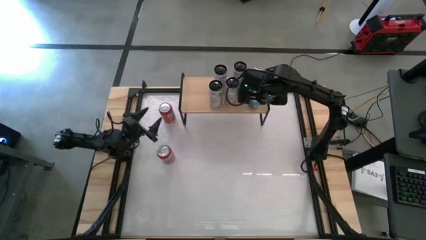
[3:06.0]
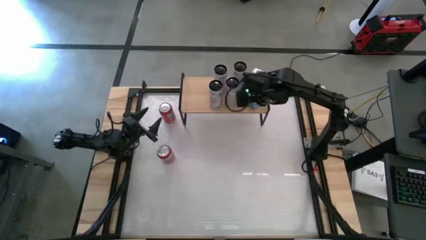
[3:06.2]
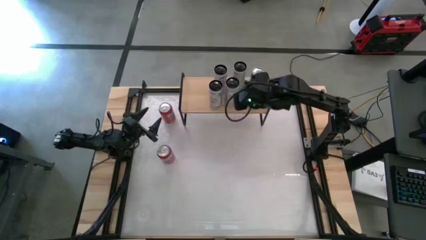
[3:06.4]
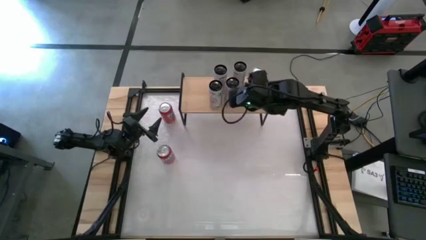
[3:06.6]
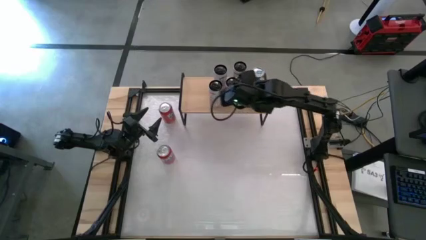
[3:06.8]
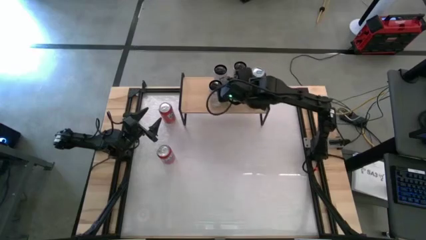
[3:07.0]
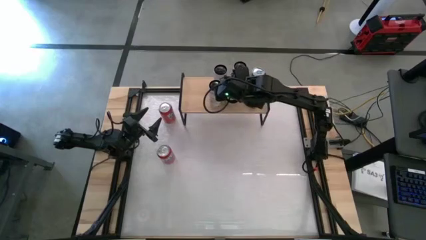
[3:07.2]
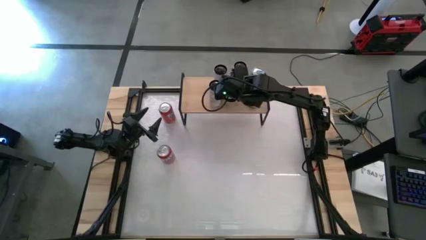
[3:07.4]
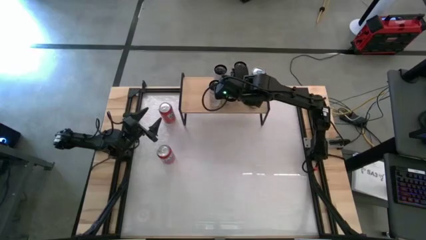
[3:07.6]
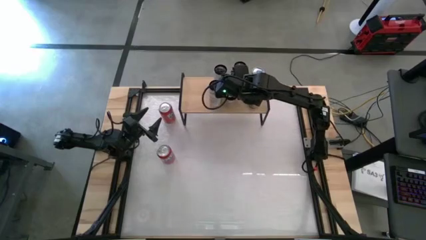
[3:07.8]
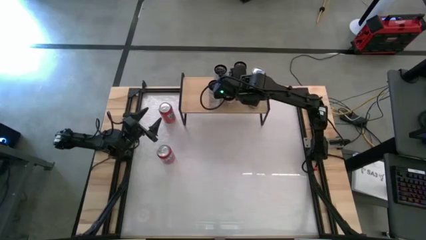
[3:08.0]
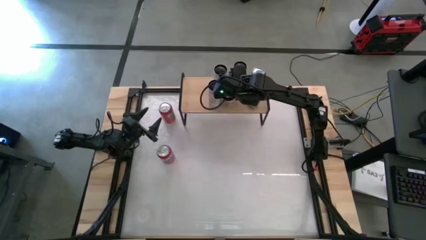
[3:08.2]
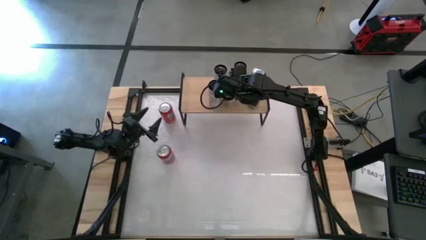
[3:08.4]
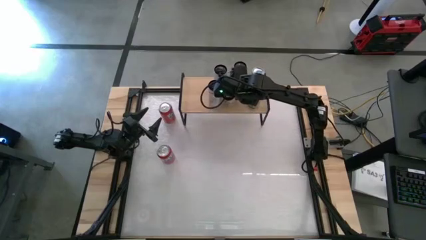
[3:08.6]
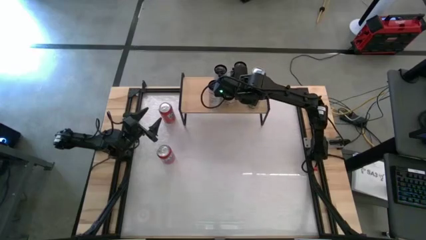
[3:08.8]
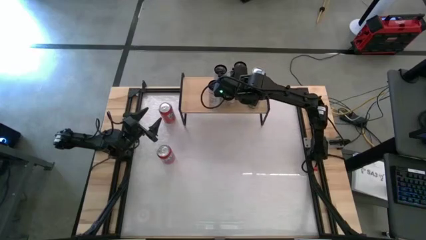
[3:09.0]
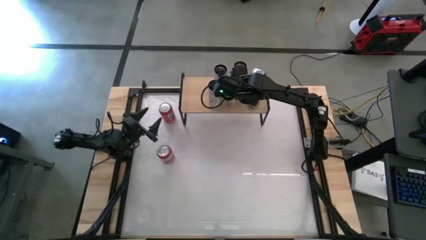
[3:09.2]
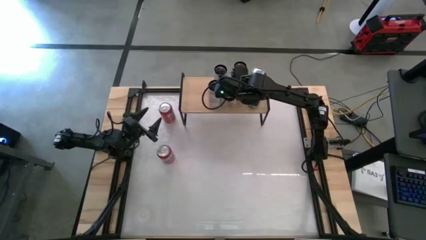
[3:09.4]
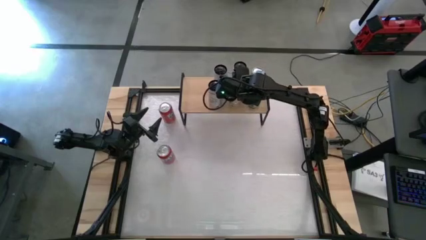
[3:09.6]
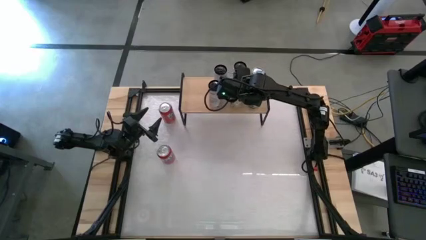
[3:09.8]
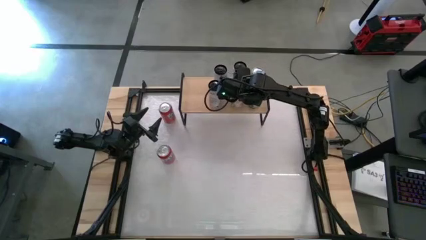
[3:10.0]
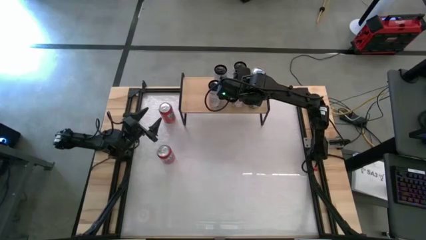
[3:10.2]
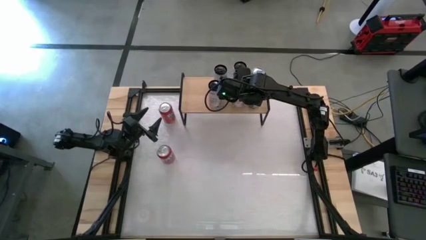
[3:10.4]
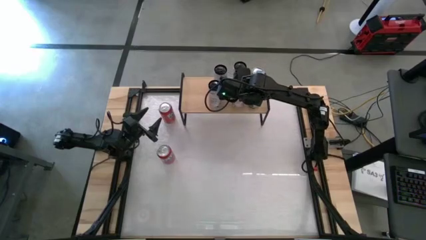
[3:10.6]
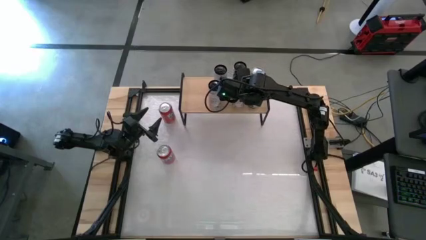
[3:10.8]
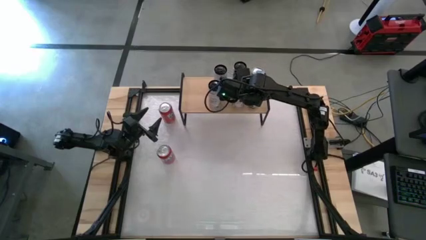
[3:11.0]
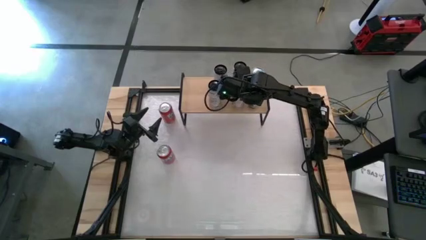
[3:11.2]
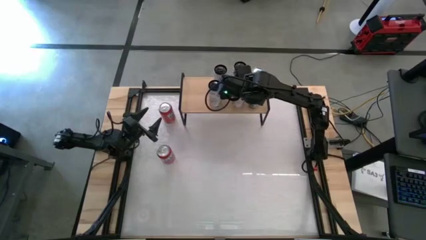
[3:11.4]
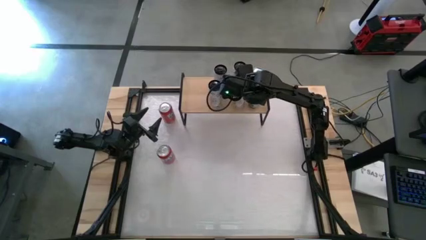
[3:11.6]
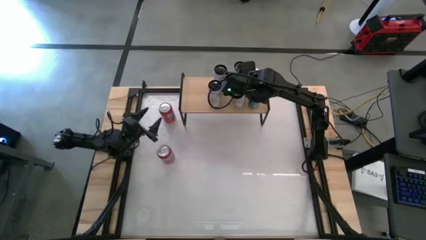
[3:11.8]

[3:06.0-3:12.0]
Task: Place canned beverage on shelf
Adjust the white yellow soda can

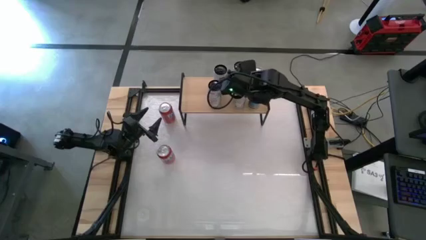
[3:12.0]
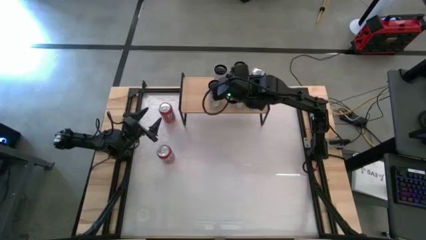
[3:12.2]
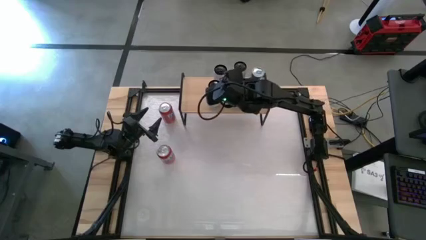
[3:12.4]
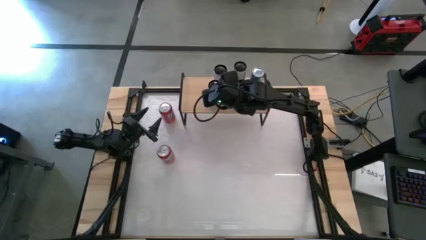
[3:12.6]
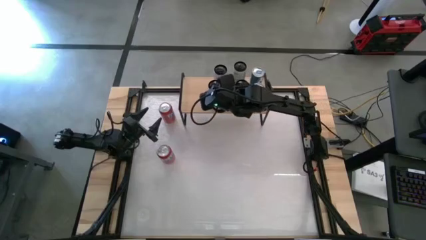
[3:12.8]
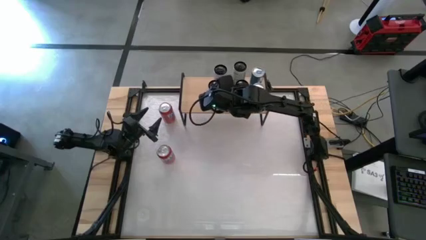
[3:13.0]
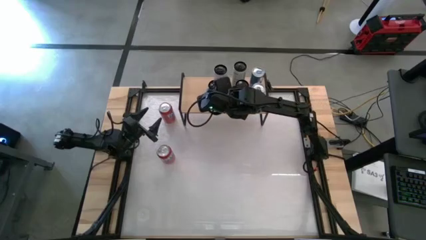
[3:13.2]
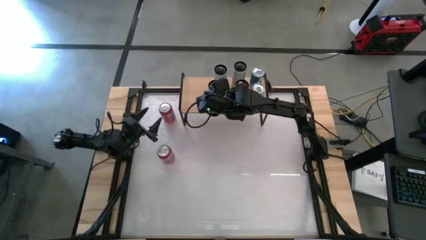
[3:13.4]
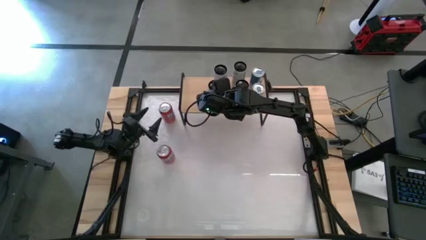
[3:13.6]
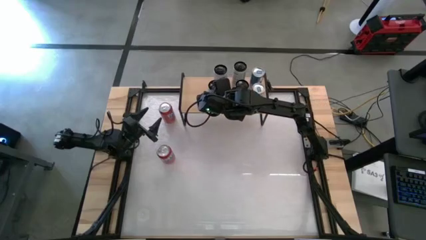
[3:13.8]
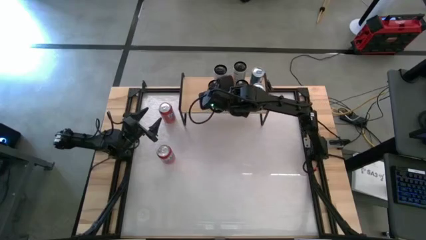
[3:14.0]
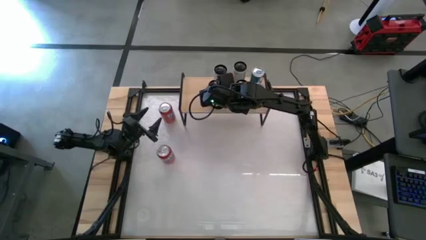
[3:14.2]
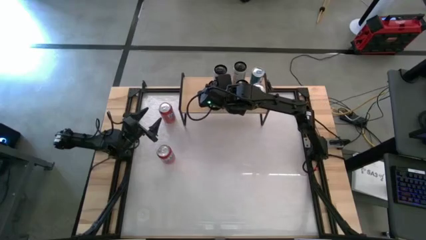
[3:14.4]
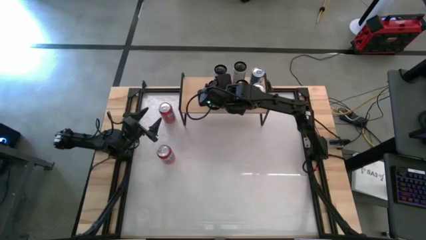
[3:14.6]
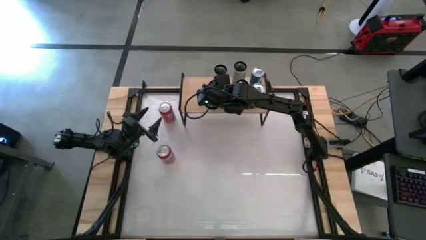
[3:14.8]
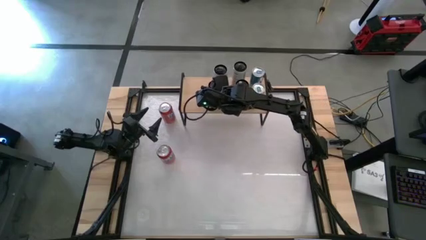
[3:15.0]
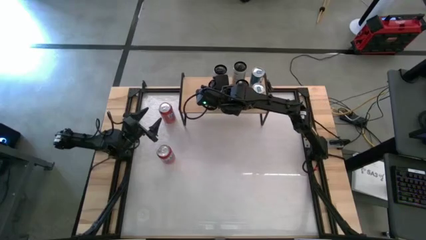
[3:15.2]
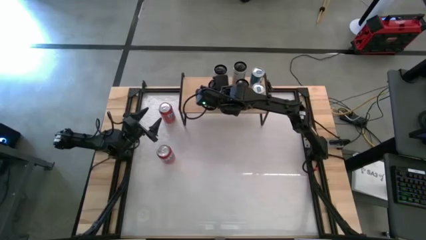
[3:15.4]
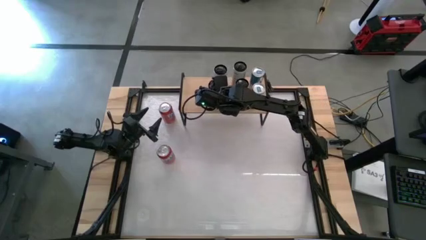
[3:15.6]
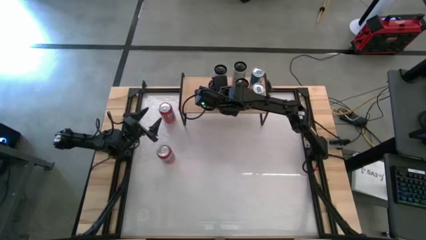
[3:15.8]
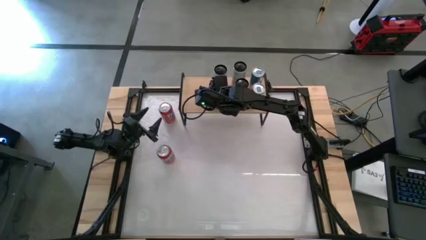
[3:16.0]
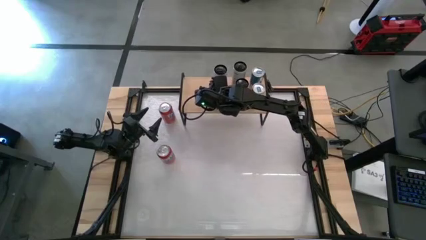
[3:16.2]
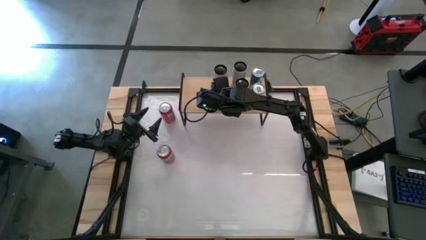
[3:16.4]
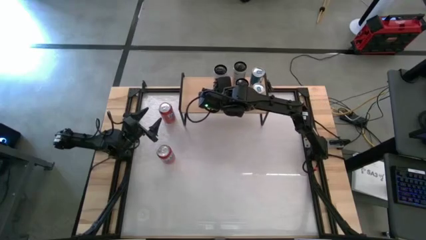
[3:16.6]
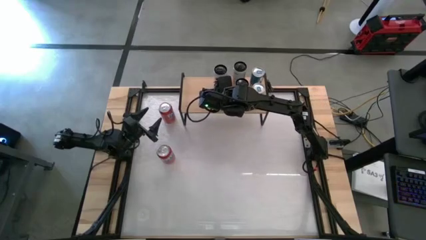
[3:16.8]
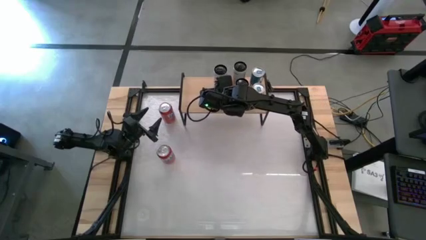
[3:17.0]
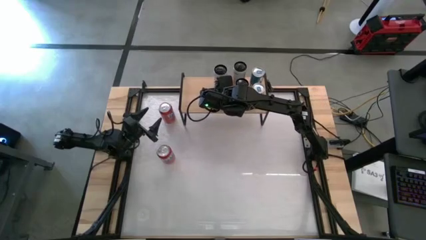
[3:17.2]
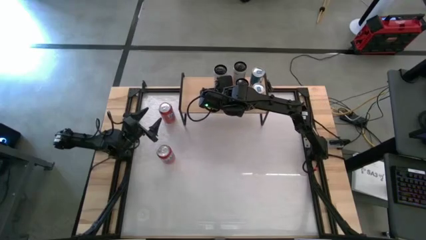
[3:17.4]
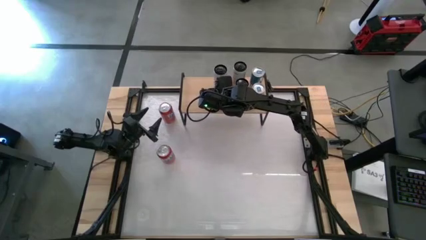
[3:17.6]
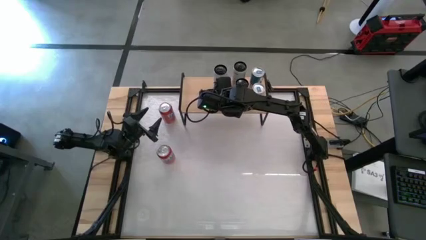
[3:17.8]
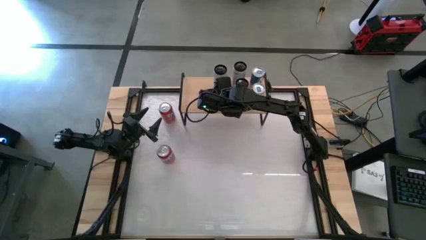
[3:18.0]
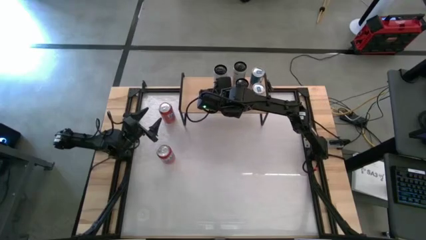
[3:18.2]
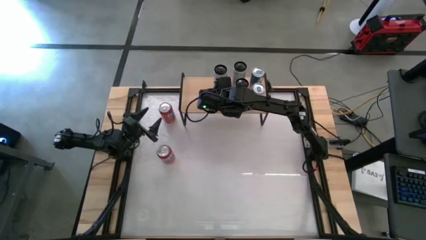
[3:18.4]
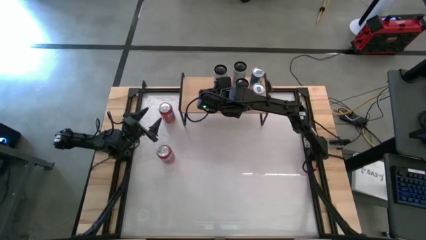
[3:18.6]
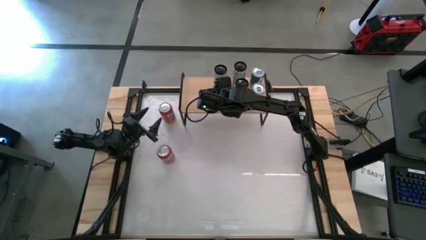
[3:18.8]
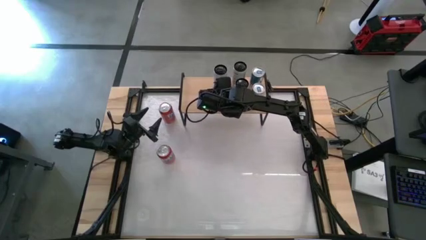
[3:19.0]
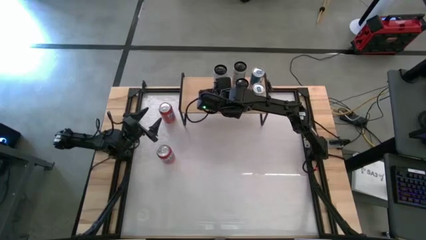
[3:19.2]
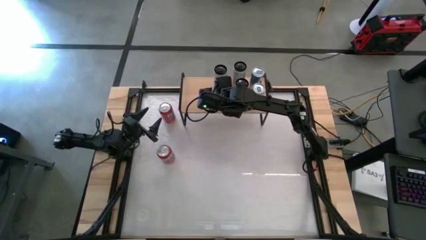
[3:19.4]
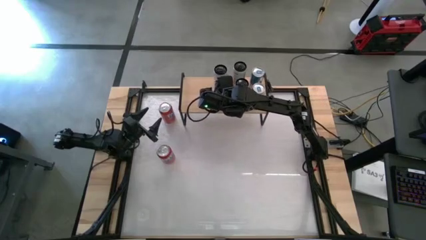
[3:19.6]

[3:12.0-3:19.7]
Adjust the white pink soda can

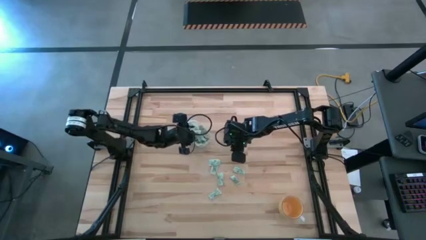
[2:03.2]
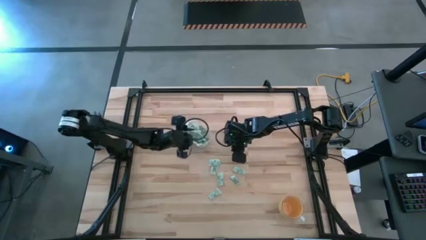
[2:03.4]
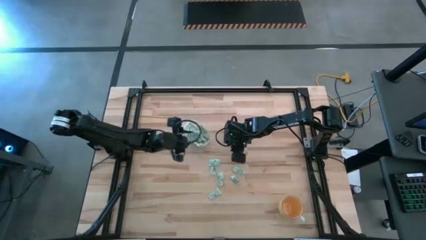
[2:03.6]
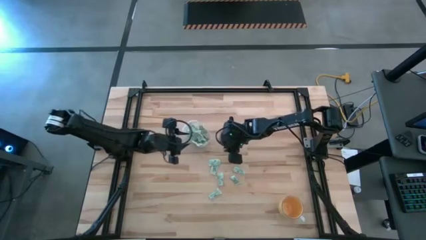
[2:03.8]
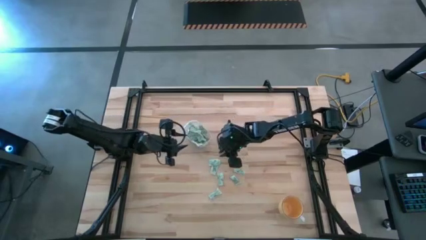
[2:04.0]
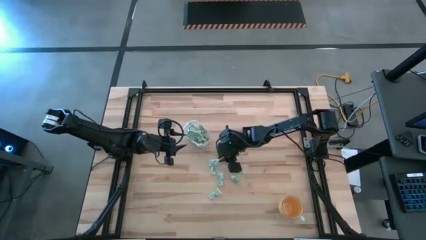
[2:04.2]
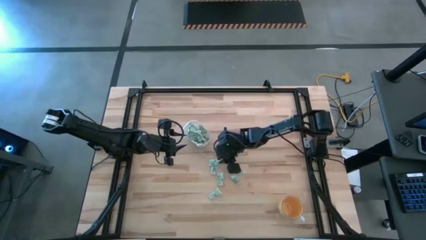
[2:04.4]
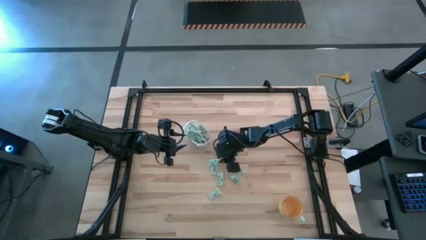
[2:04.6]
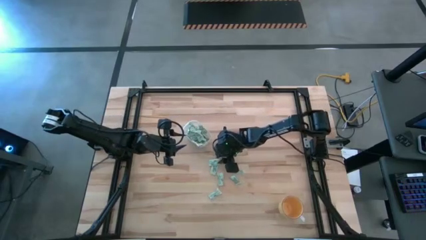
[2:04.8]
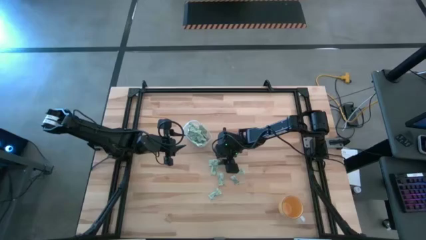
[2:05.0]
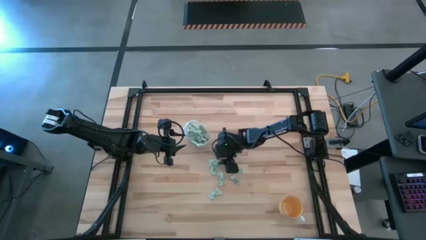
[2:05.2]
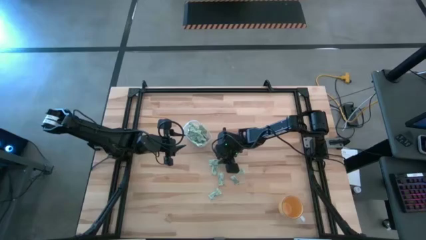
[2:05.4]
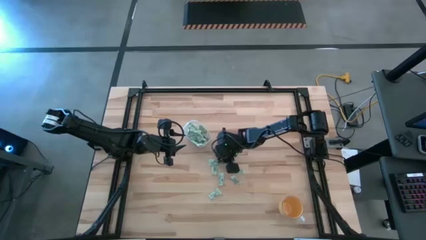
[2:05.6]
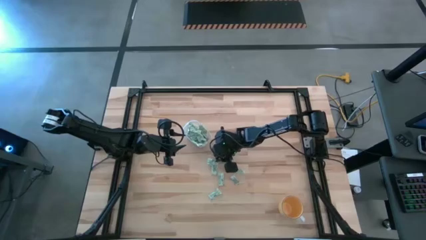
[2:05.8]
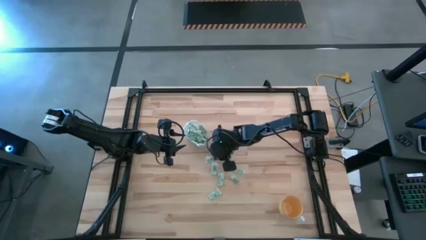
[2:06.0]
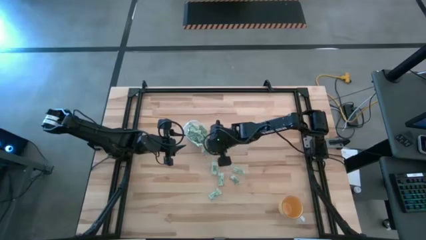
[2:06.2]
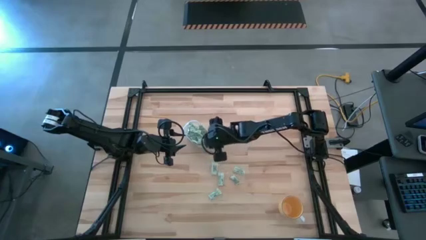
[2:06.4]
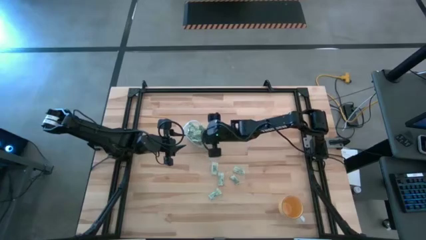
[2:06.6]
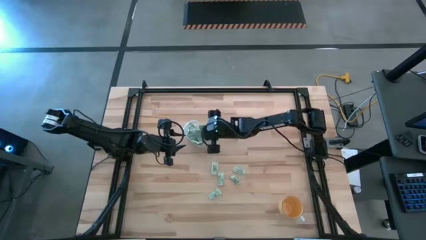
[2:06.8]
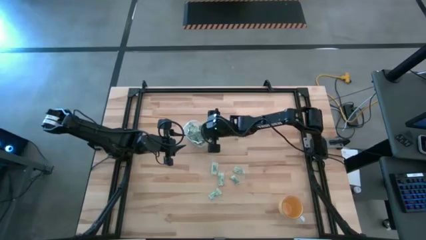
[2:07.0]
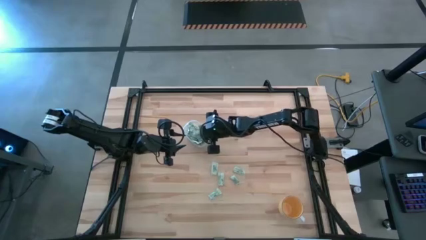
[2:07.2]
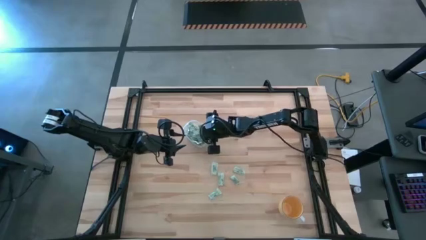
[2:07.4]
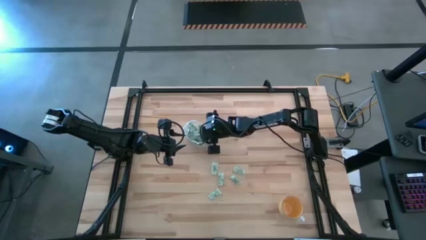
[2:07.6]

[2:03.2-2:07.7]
Task: Pick and place Stevia / Truvia into bins
Put the stevia packet into the transparent bin
